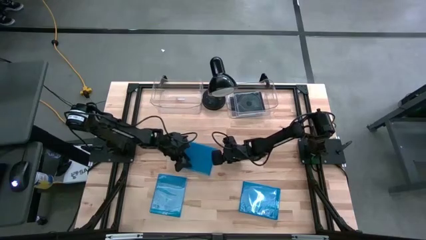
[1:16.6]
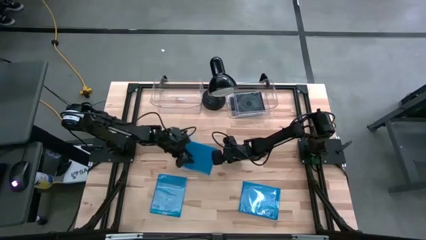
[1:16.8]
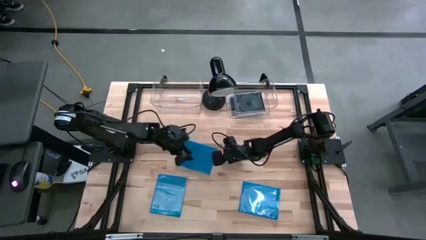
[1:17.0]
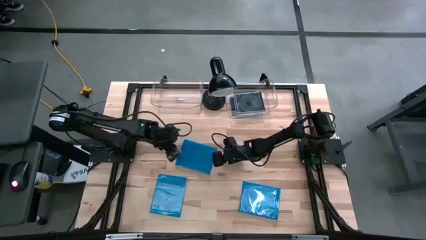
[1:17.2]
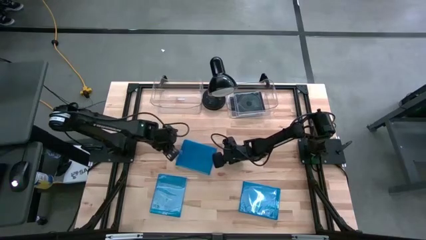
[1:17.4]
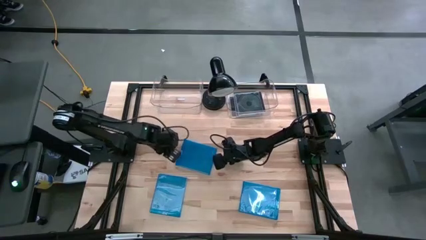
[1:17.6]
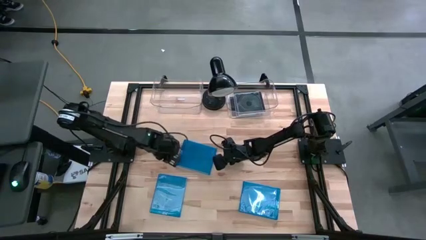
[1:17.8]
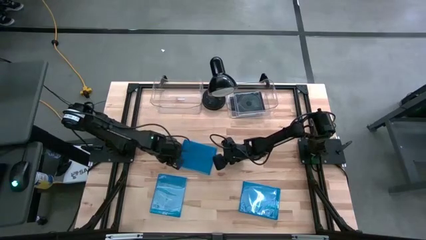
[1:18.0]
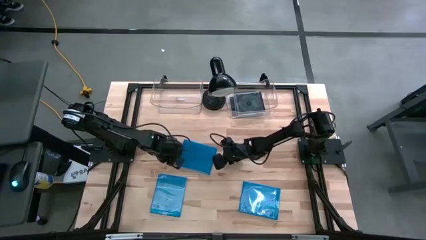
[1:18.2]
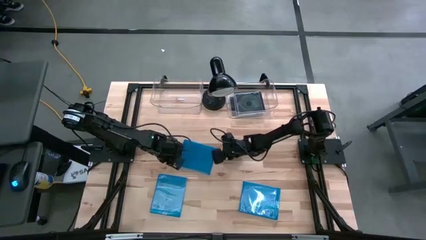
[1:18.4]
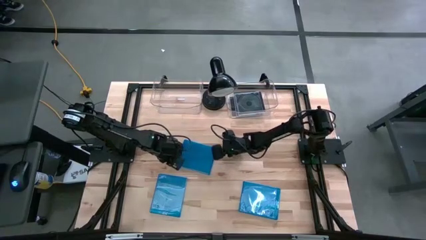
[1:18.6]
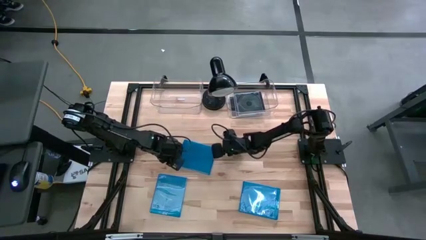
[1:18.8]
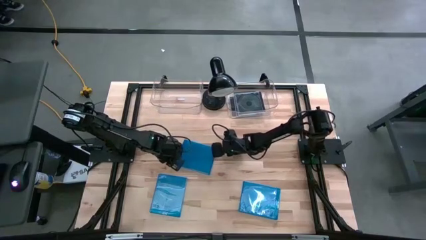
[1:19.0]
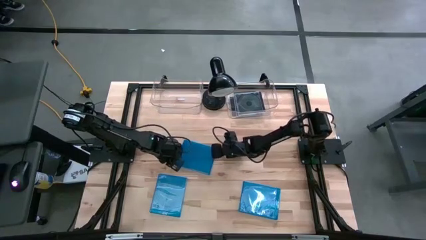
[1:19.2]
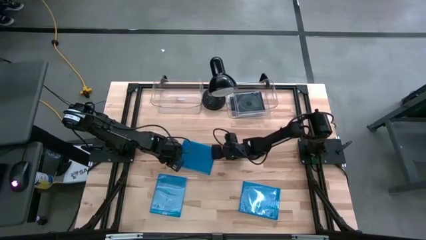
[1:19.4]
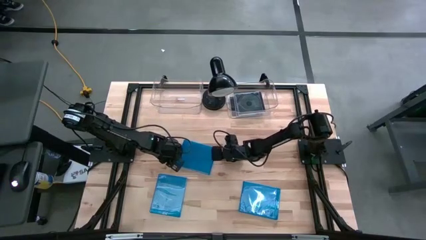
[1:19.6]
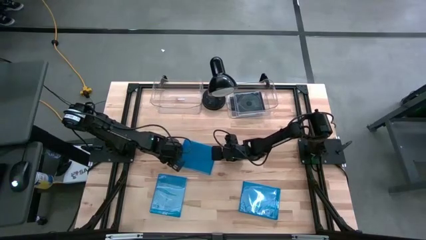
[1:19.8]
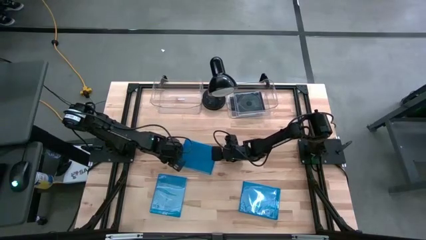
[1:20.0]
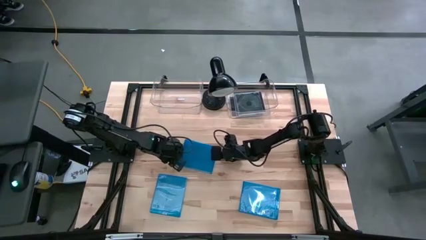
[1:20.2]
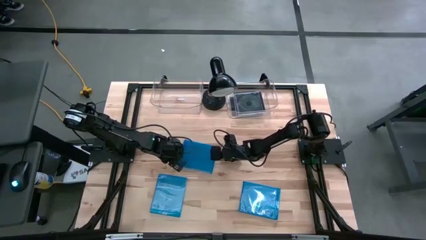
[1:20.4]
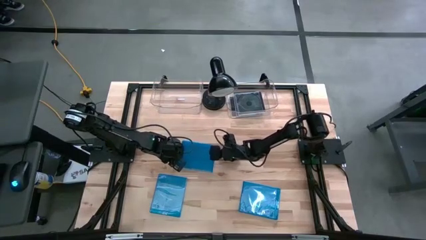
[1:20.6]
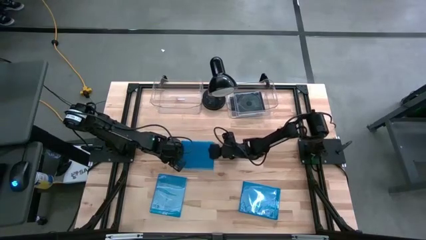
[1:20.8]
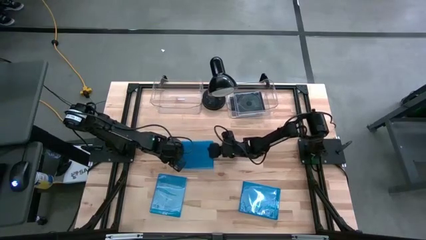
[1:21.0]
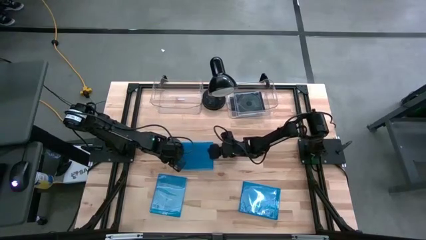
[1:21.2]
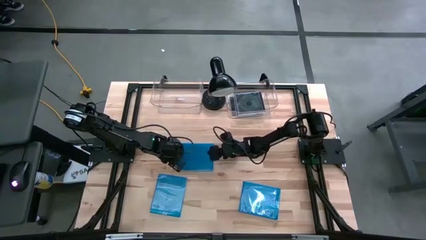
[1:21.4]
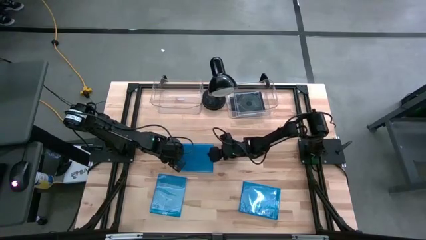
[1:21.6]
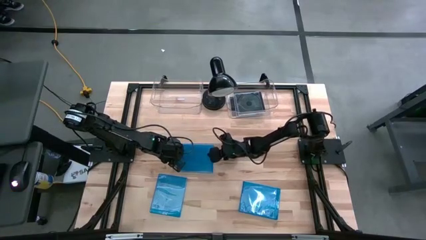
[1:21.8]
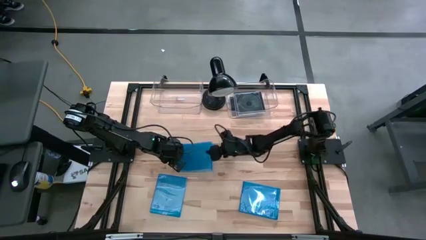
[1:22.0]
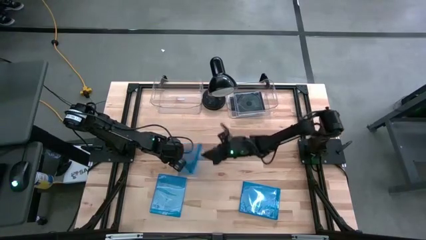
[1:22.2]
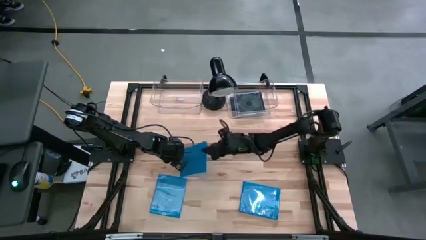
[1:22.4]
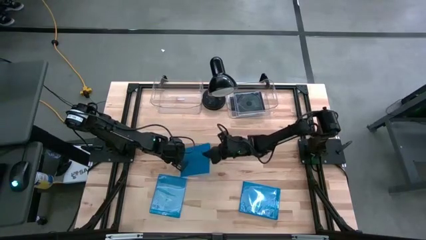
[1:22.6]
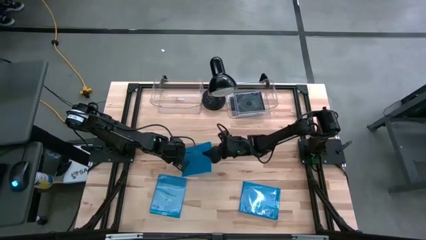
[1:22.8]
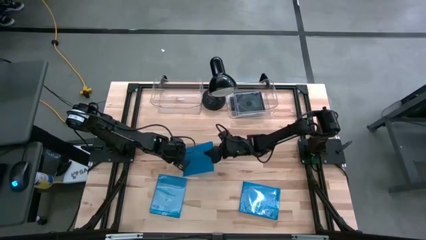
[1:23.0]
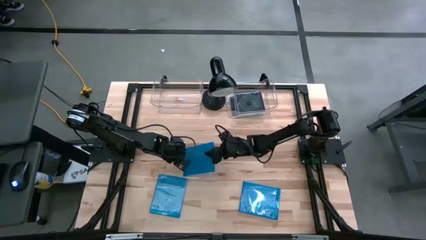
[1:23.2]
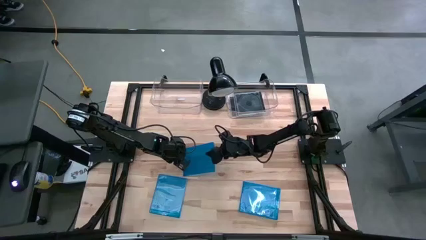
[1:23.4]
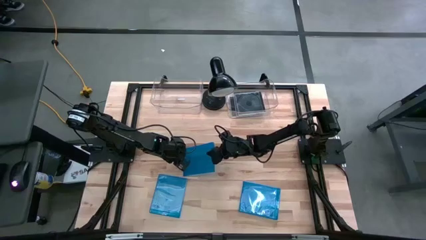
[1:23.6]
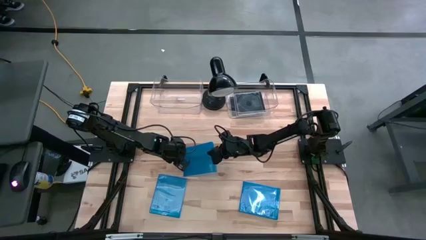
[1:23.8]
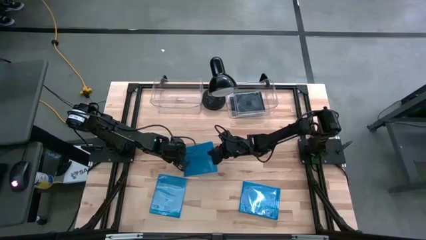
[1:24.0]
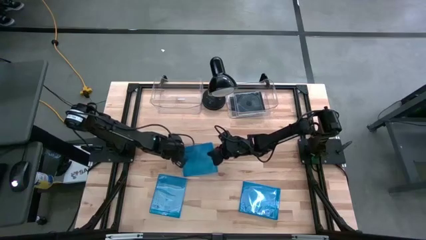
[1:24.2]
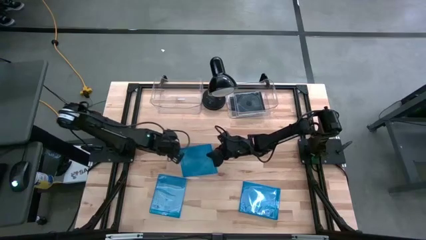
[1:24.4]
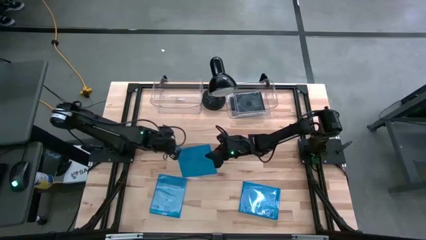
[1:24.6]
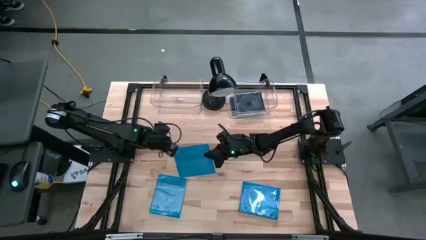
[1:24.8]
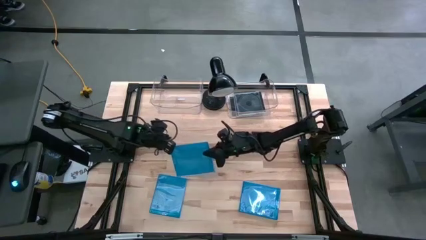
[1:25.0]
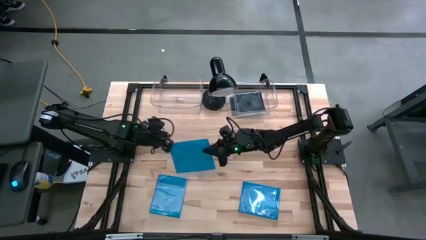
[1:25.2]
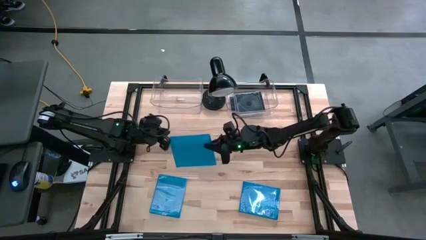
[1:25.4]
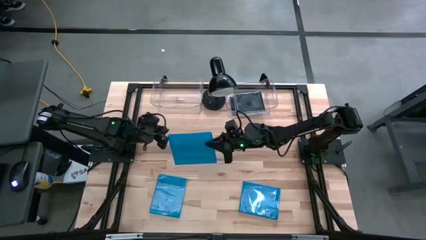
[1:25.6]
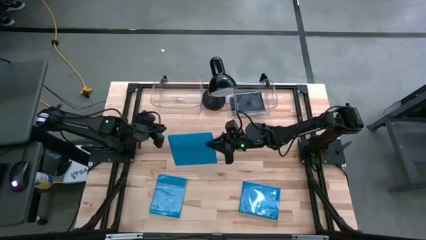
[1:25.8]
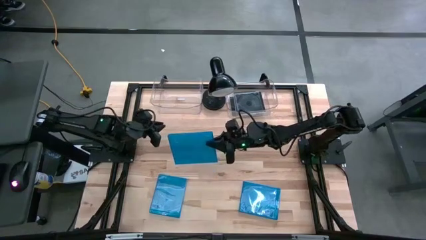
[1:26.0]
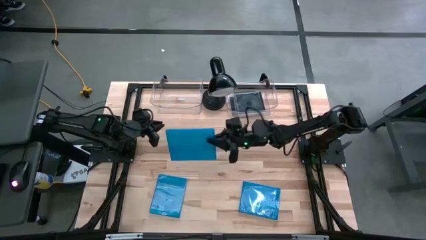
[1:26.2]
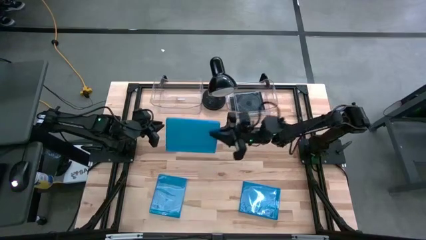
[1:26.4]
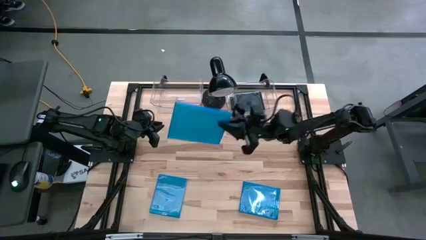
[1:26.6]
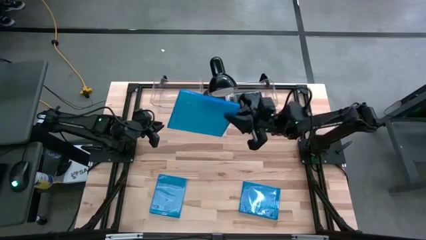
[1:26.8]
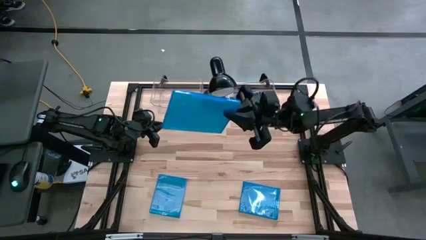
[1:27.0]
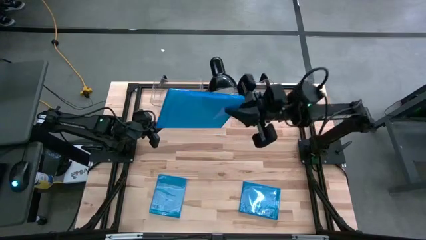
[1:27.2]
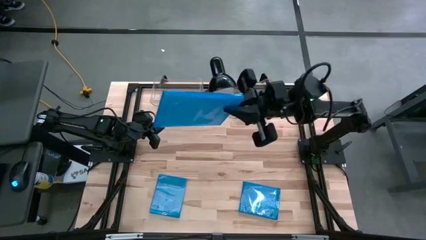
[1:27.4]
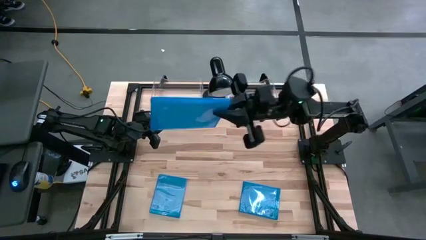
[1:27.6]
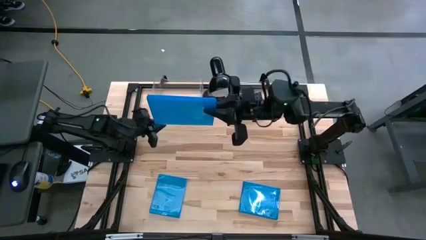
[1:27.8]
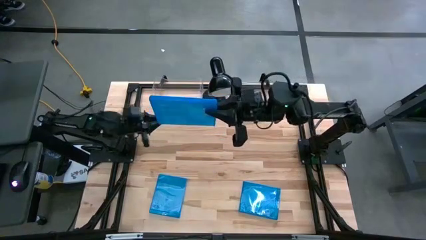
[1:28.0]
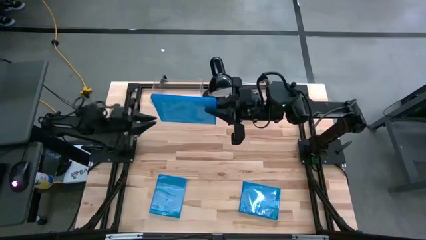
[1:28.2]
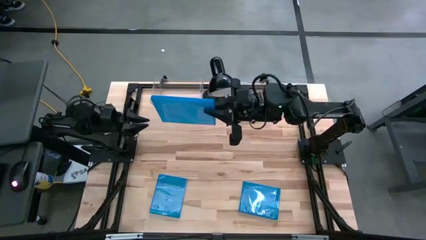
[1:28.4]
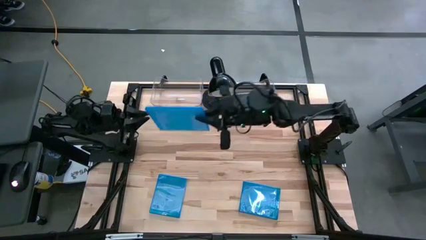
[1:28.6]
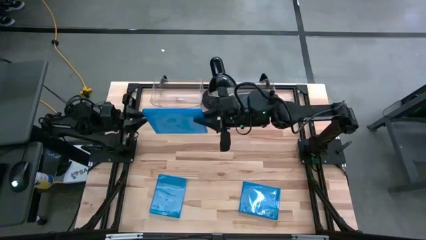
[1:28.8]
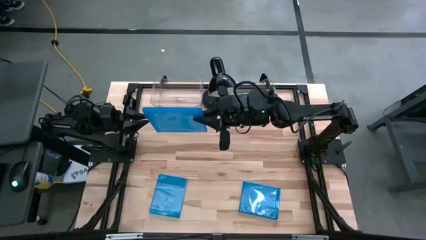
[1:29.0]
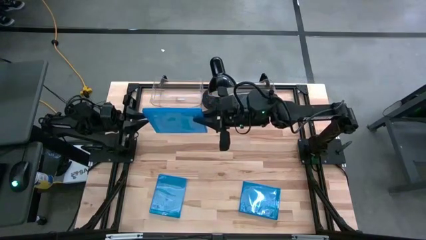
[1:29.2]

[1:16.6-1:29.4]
Task: Pick & place jewel cases by type
Put the top left blue CD case into the left transparent bin

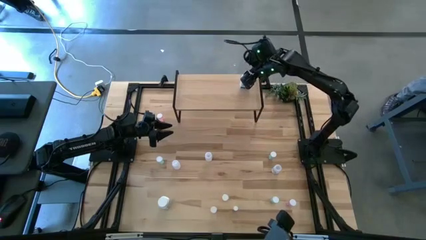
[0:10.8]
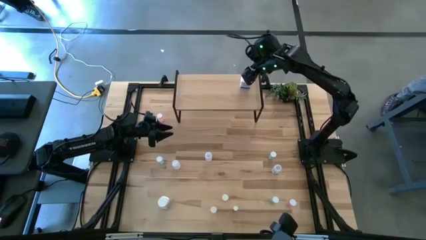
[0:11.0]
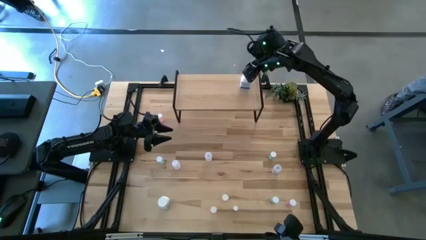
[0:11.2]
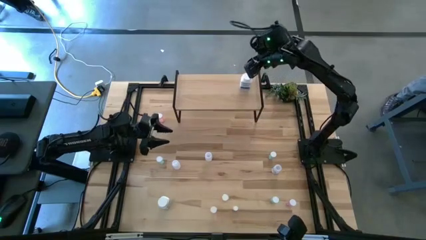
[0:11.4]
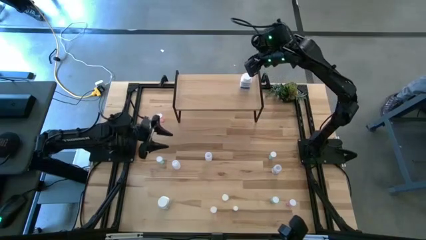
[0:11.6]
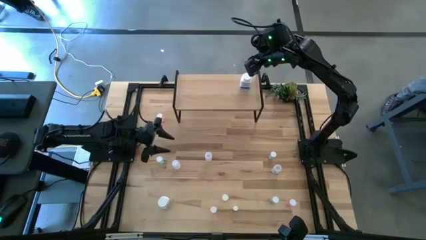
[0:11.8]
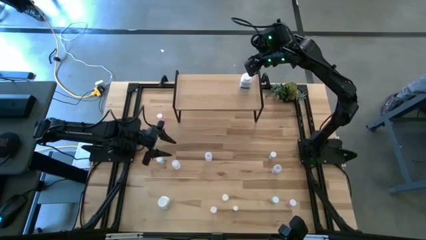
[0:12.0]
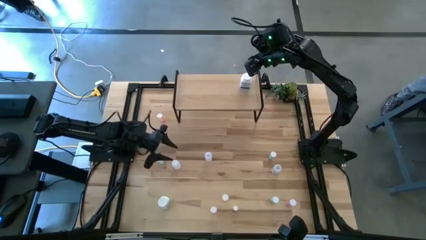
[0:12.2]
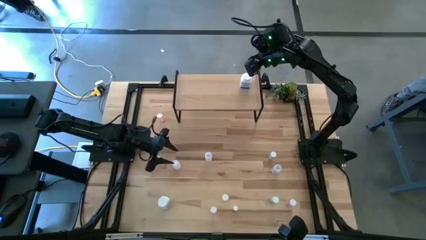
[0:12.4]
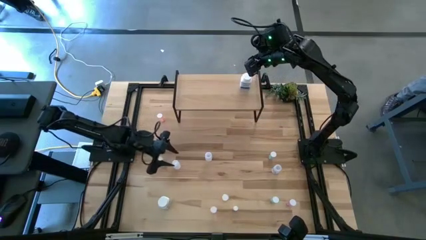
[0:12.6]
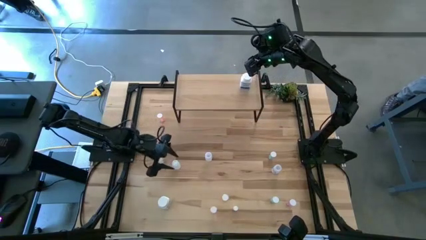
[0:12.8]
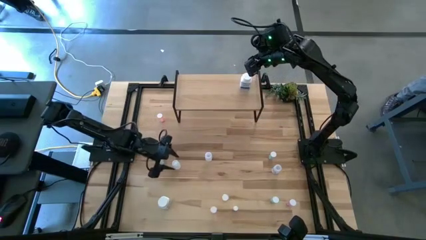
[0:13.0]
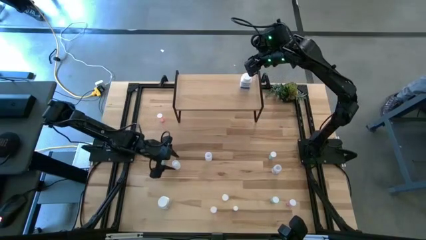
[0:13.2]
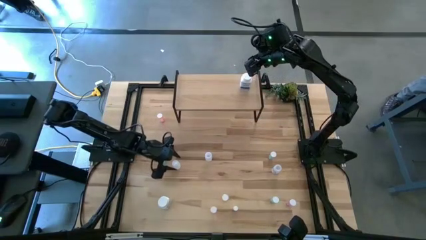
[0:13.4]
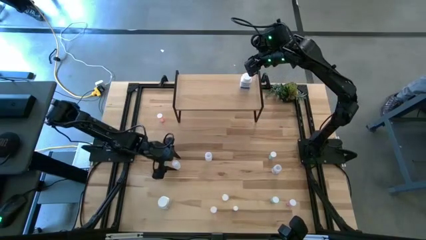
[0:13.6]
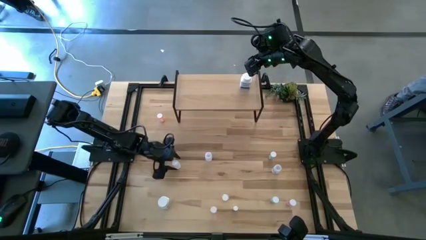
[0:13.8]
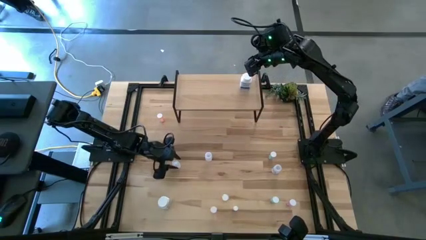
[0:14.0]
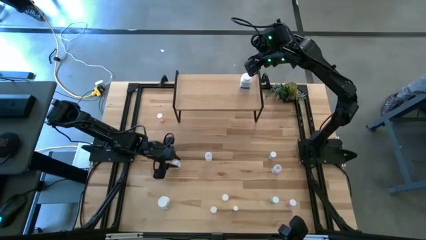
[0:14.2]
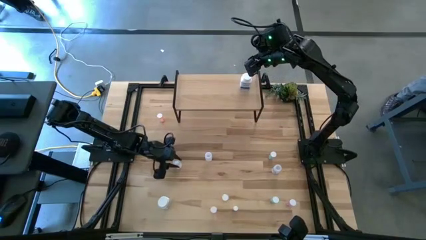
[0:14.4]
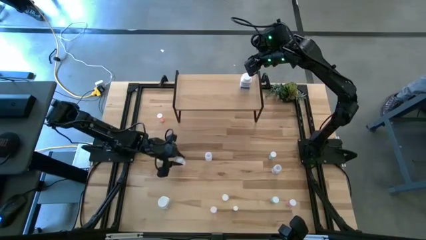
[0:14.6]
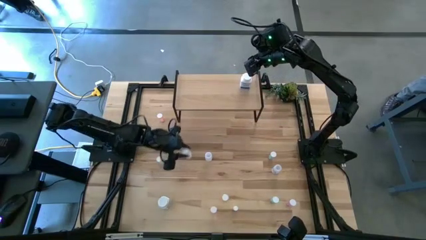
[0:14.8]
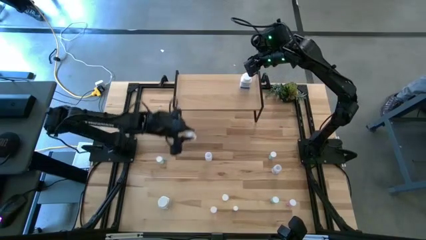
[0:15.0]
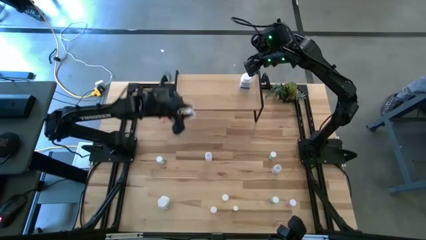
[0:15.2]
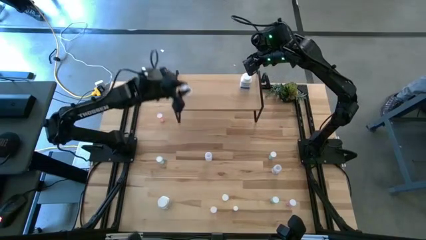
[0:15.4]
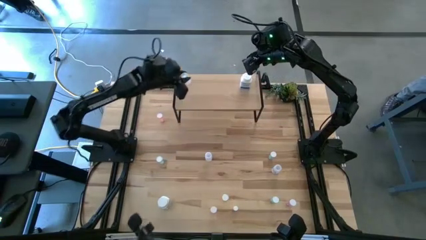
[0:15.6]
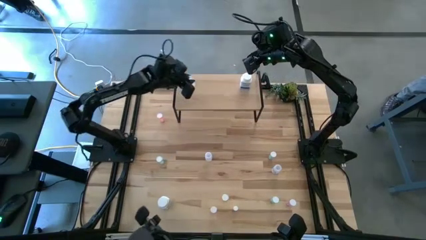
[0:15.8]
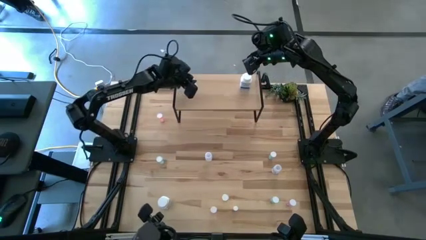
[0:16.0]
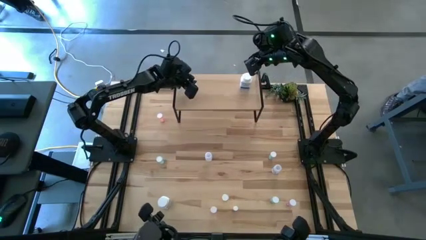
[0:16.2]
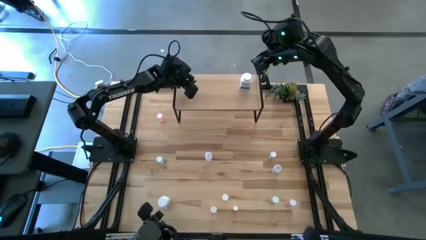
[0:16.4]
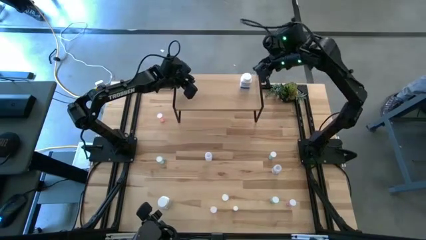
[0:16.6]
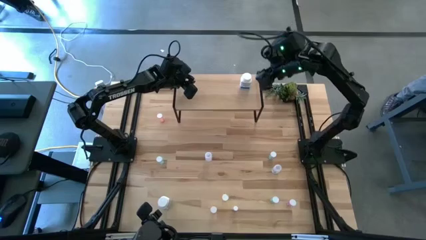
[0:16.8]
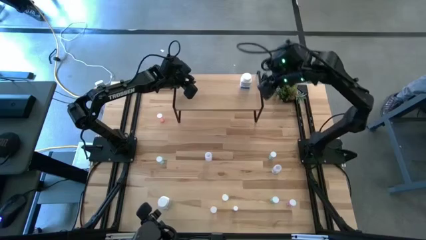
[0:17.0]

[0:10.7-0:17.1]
Task: Pick and place medicine bottles onto shelf by color
Put the left transparent pill bottle on the shelf
